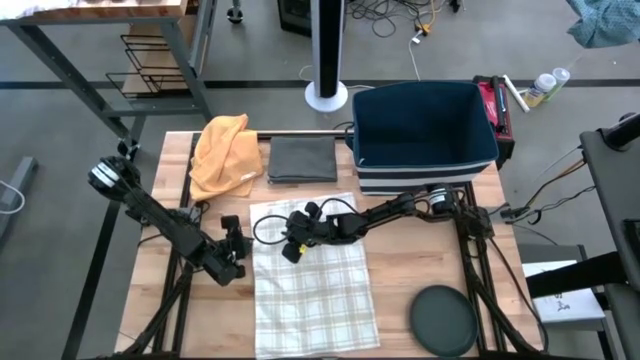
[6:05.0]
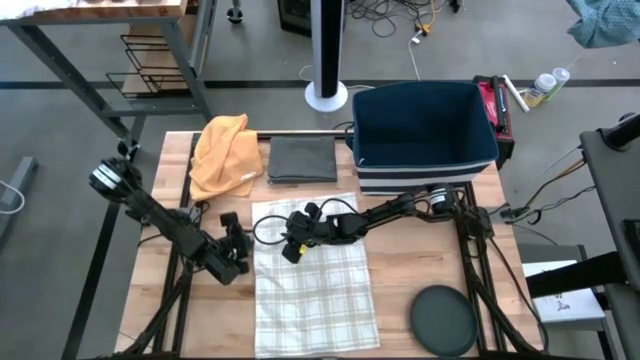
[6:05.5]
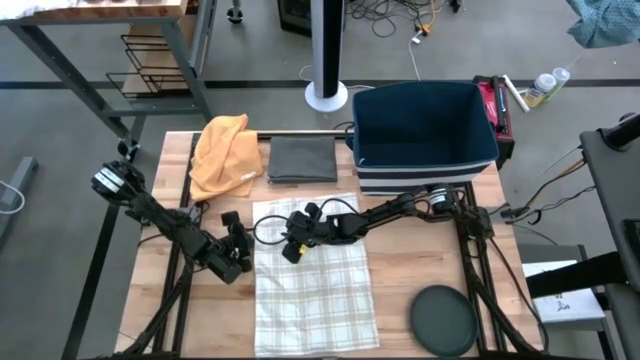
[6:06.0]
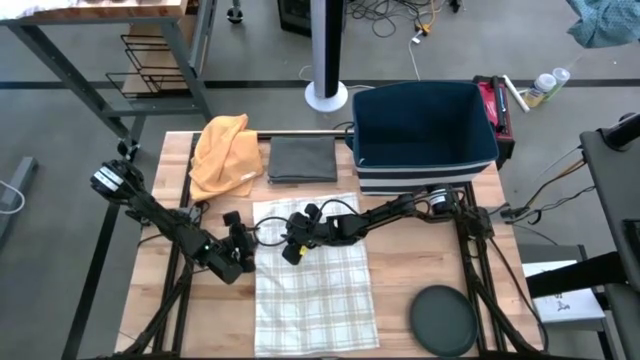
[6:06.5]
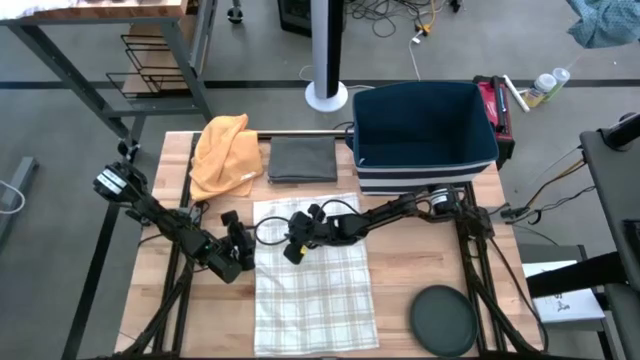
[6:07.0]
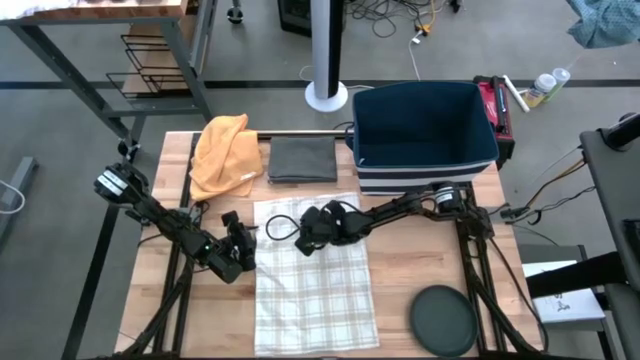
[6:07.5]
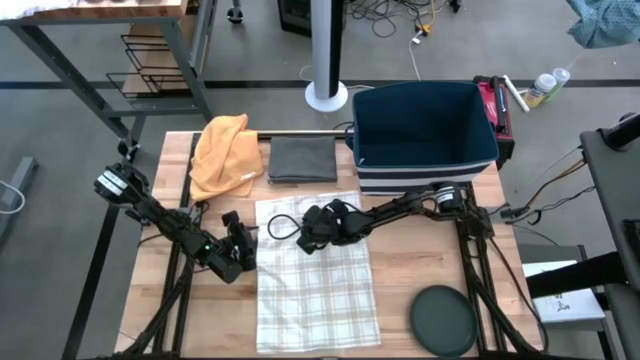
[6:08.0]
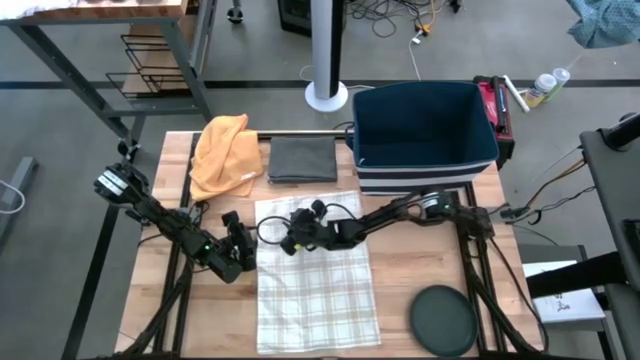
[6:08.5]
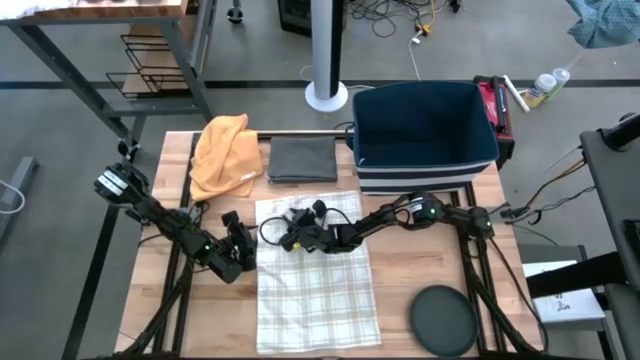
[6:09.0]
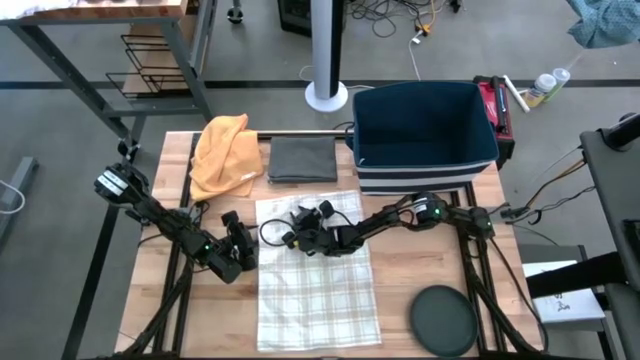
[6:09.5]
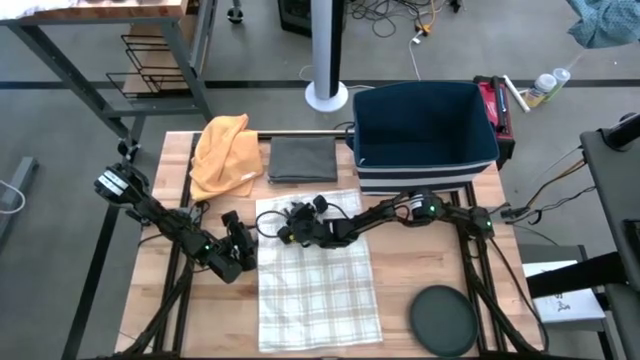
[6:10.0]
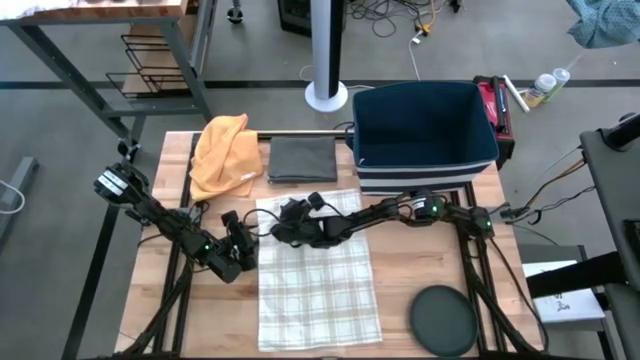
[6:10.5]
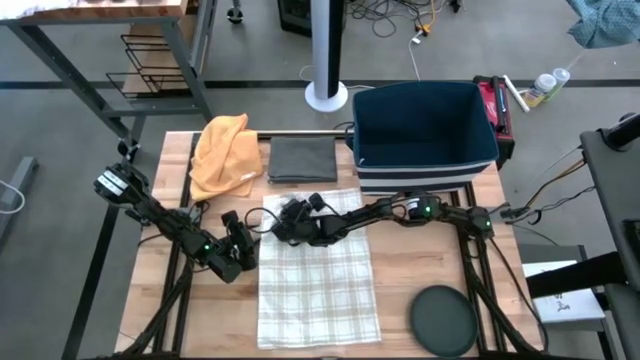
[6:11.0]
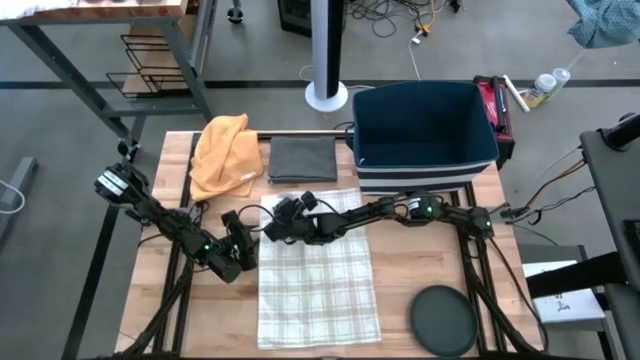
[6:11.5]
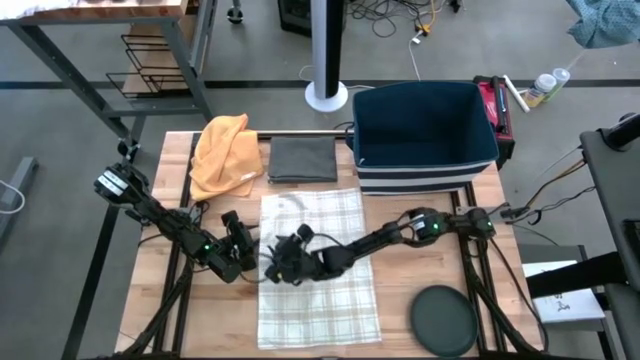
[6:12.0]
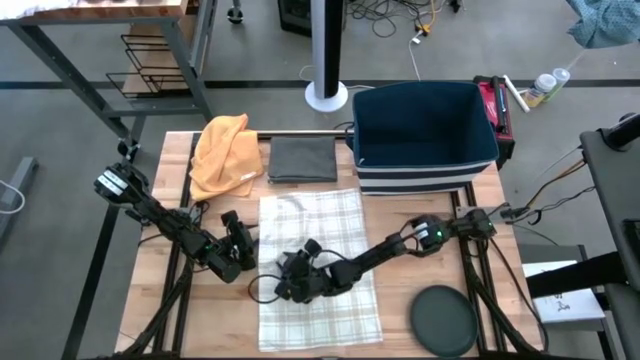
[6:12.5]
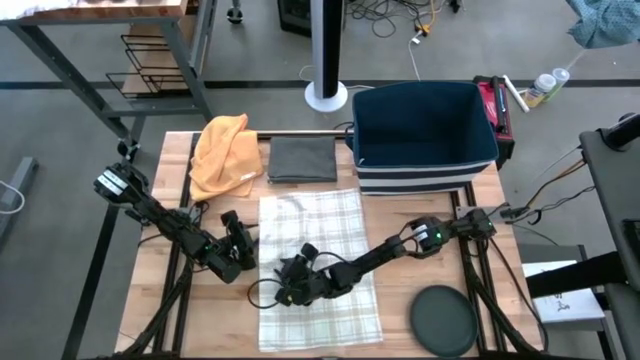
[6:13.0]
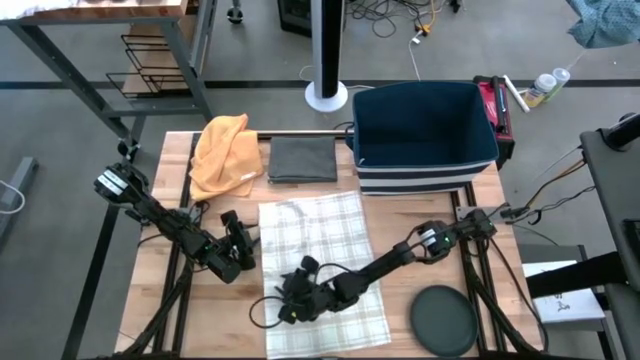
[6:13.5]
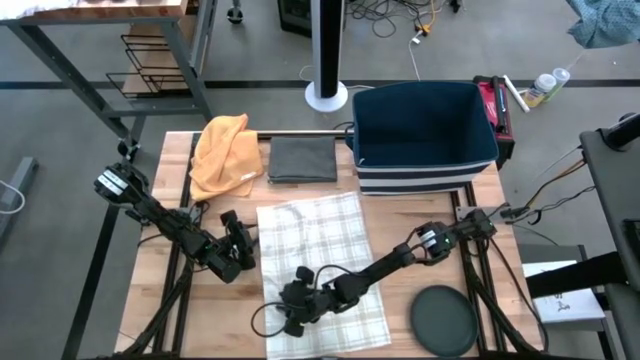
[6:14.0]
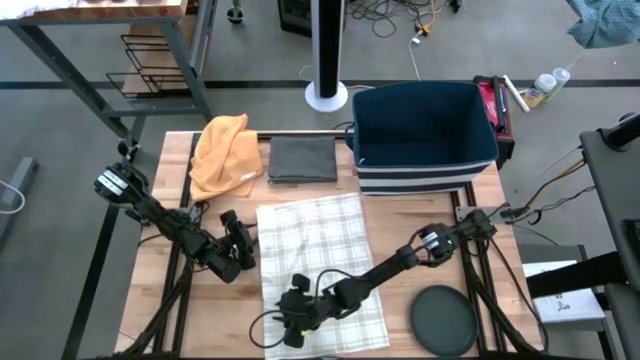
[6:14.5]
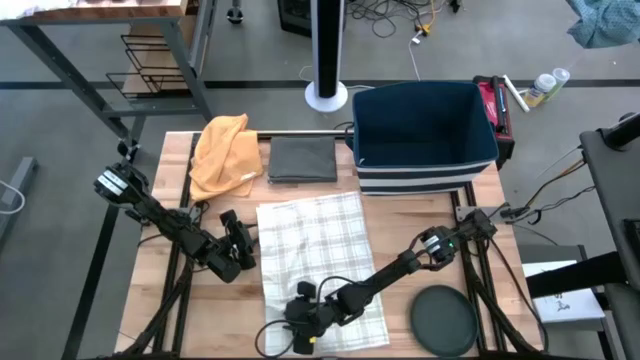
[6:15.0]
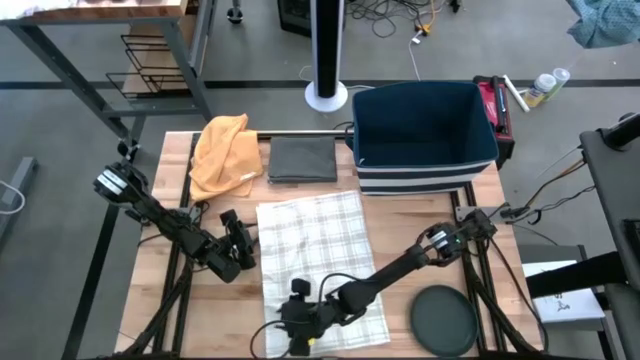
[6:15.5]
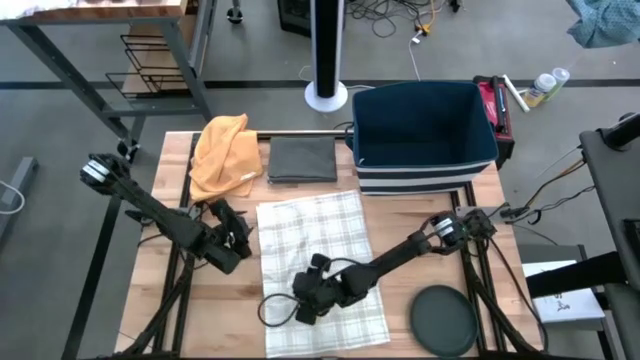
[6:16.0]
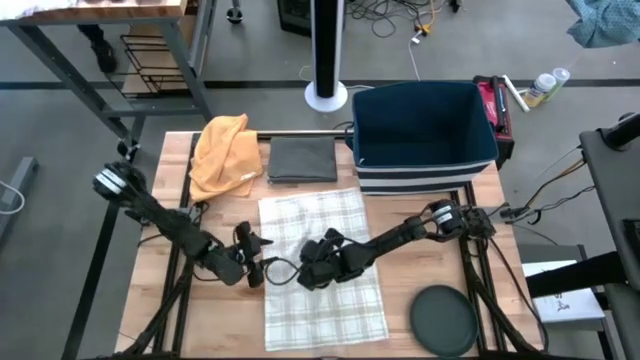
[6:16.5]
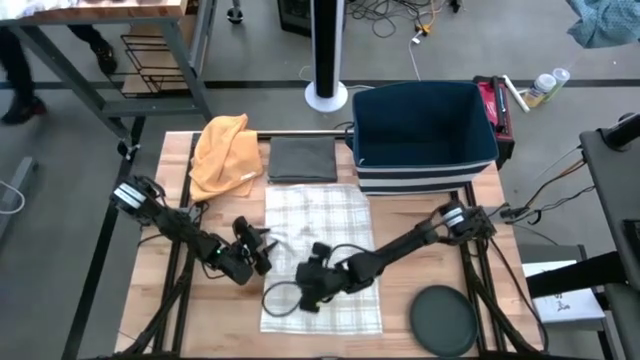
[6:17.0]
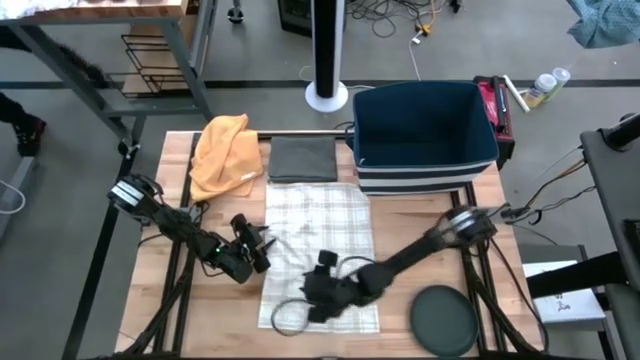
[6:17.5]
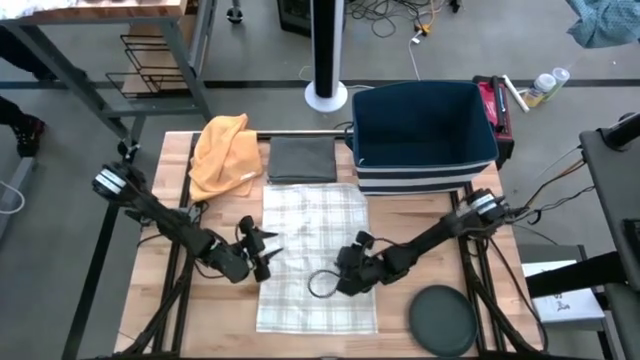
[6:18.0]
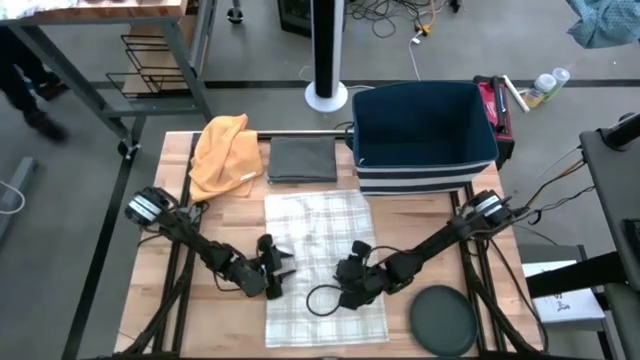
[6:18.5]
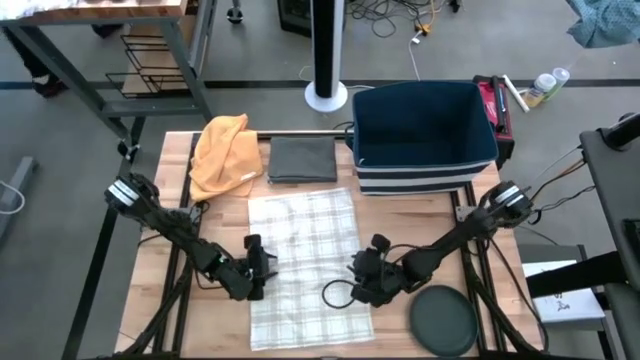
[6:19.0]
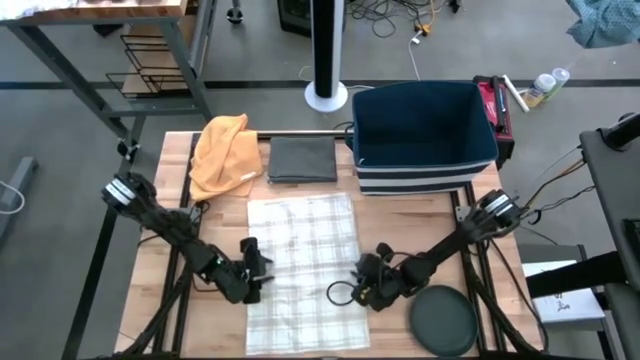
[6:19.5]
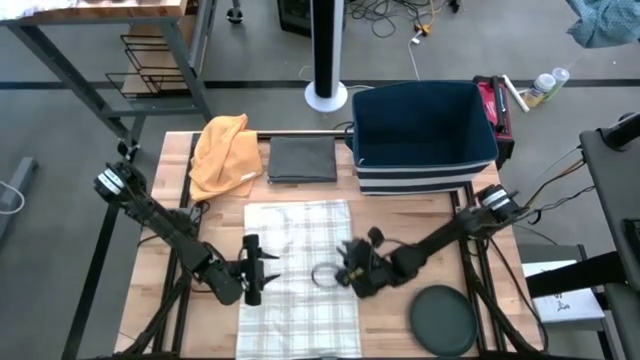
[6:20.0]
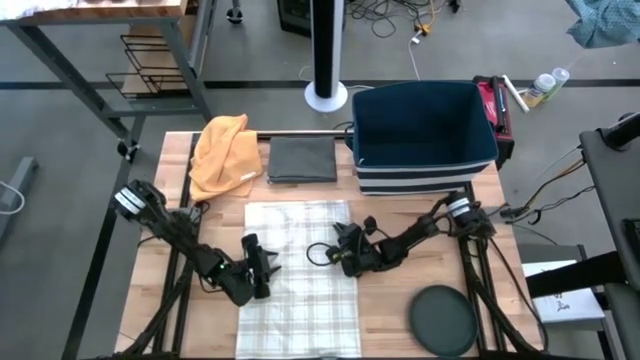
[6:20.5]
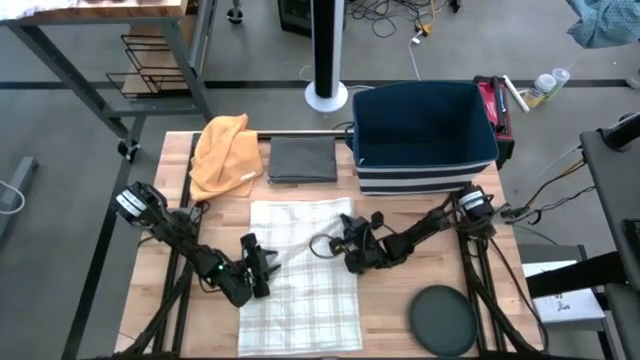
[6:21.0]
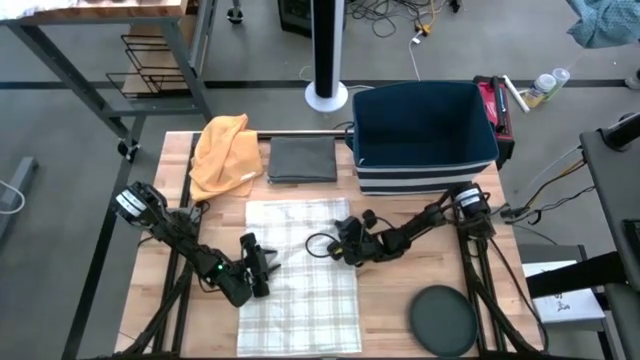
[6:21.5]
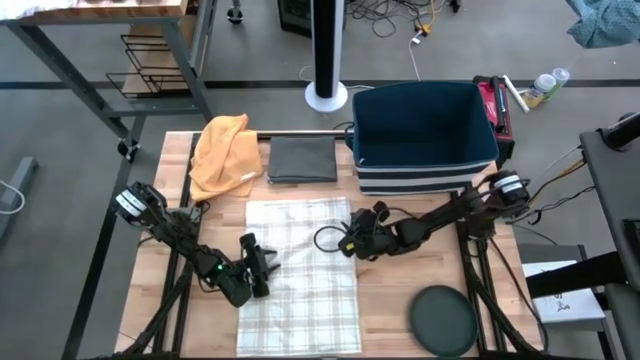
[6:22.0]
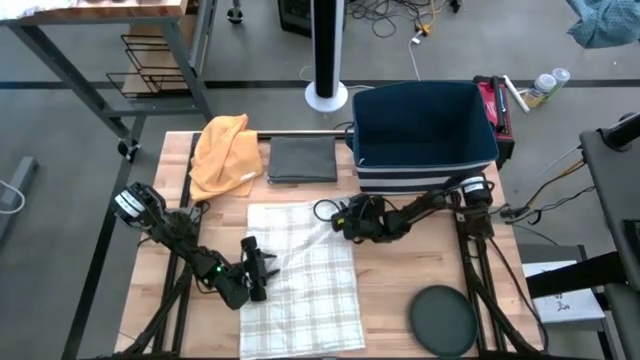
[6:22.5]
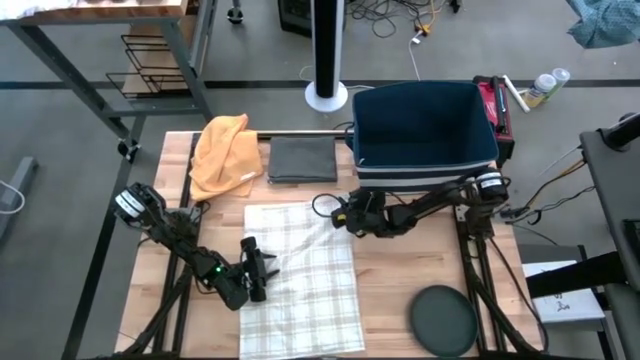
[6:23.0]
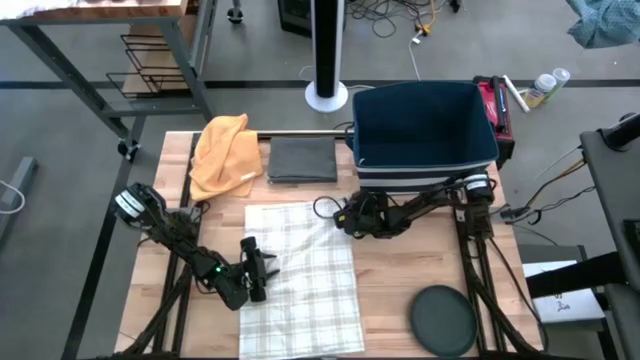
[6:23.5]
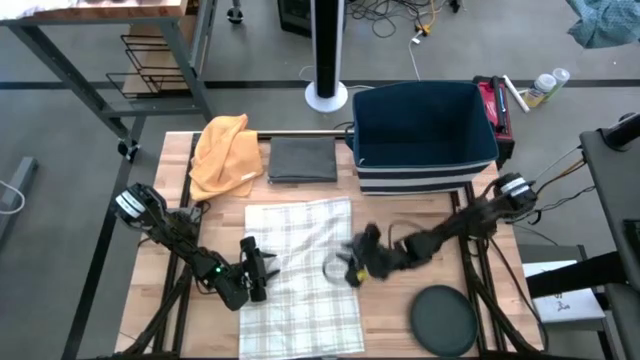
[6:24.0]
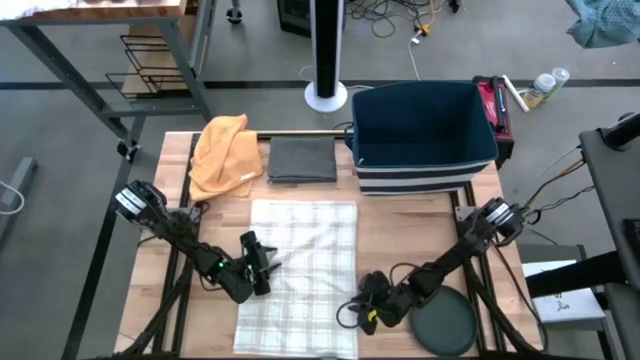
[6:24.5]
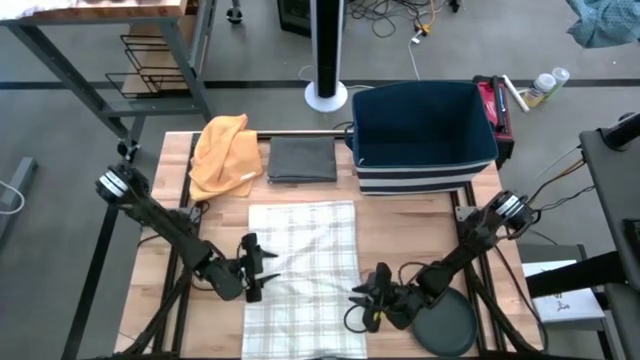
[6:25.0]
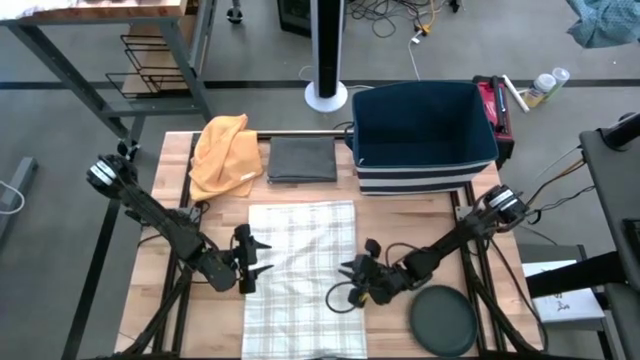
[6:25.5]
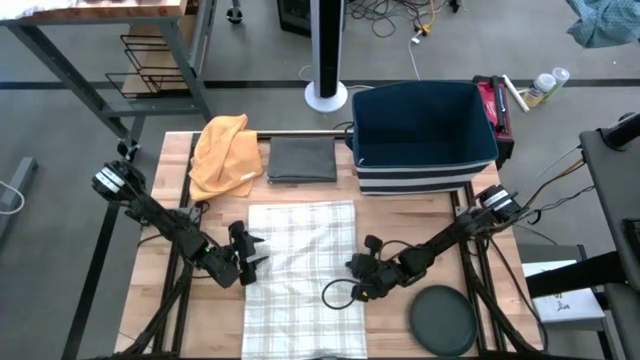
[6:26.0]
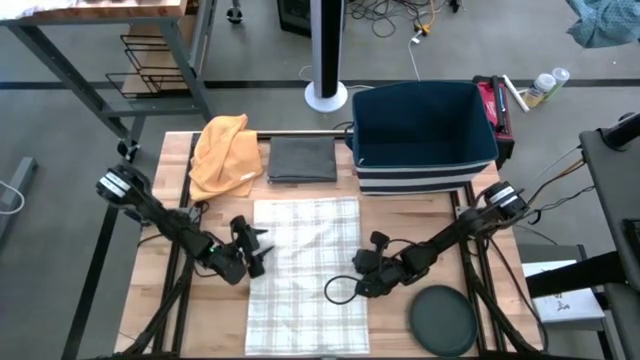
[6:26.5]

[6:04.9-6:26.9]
Task: Fold kitchen towel into neat rectangle
Fold the white patterned towel
